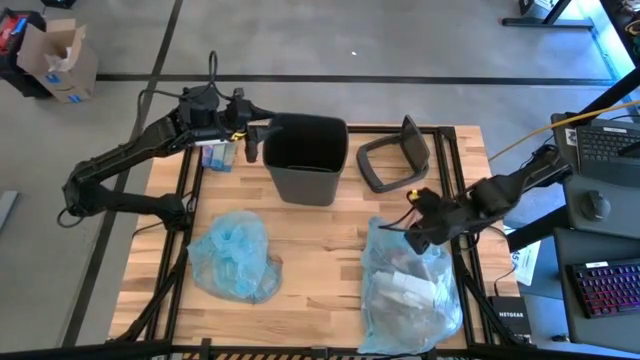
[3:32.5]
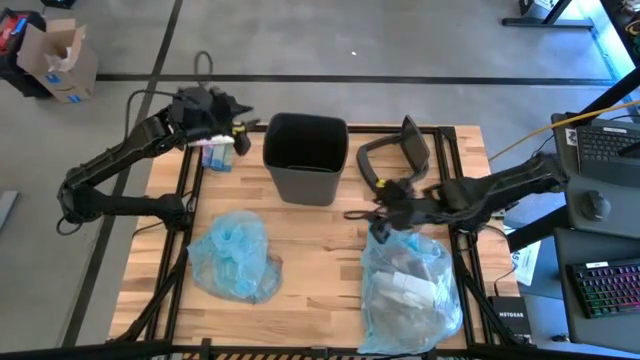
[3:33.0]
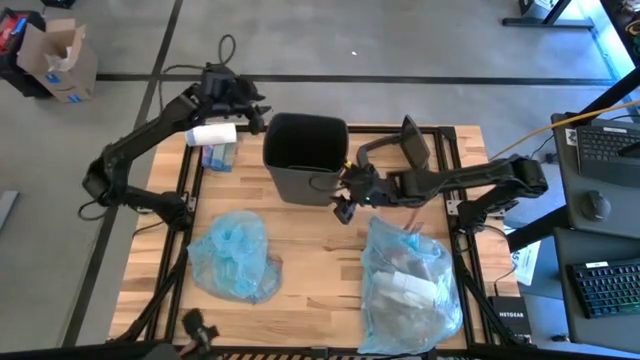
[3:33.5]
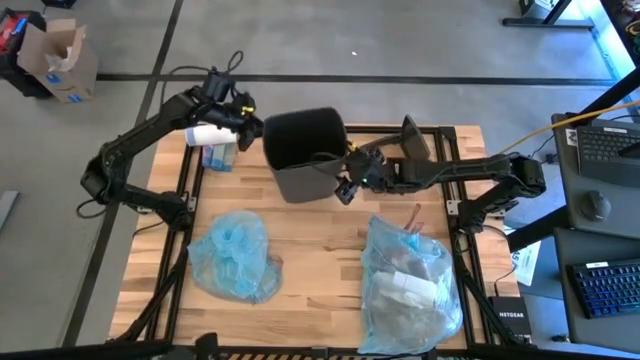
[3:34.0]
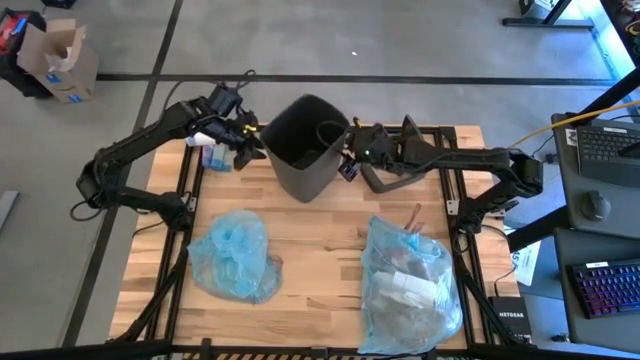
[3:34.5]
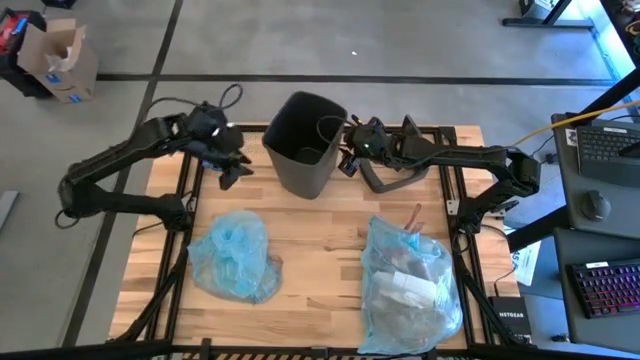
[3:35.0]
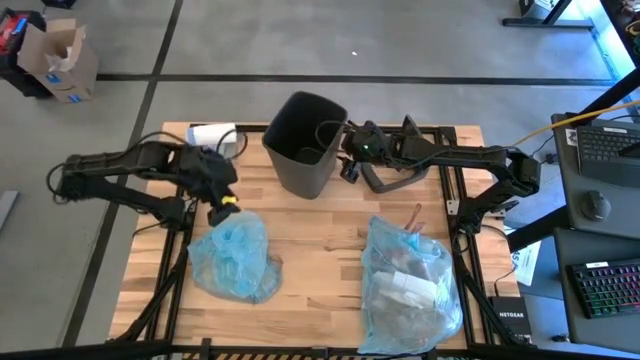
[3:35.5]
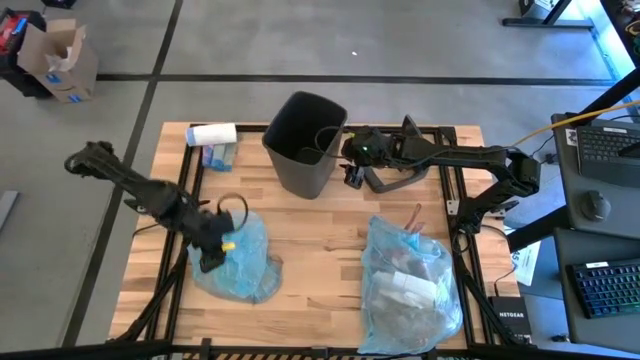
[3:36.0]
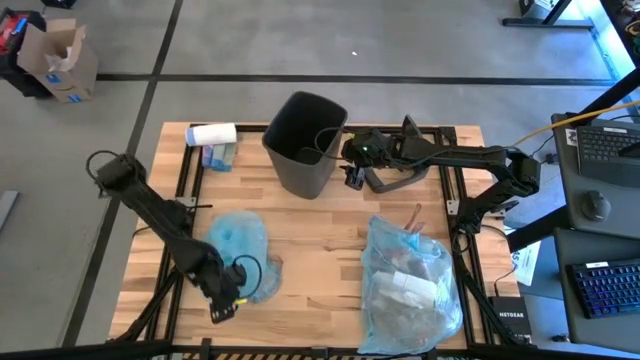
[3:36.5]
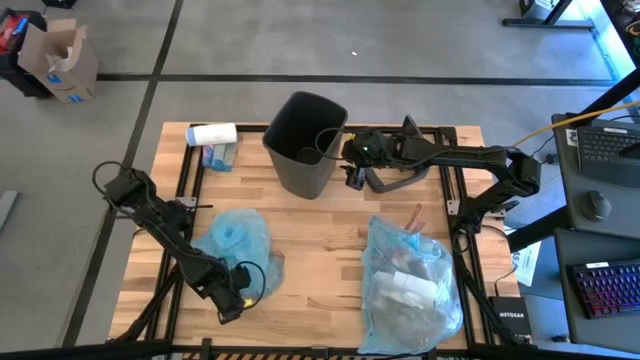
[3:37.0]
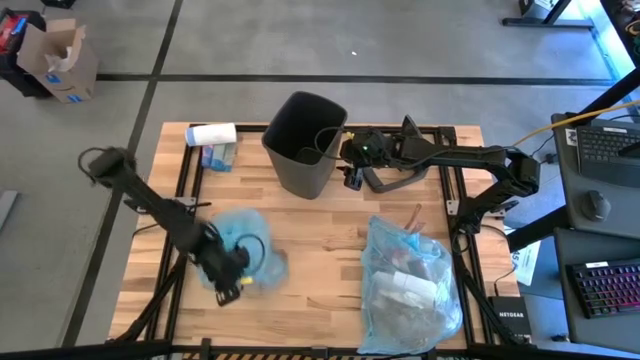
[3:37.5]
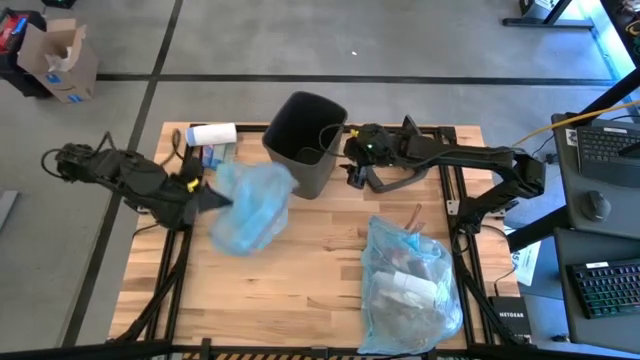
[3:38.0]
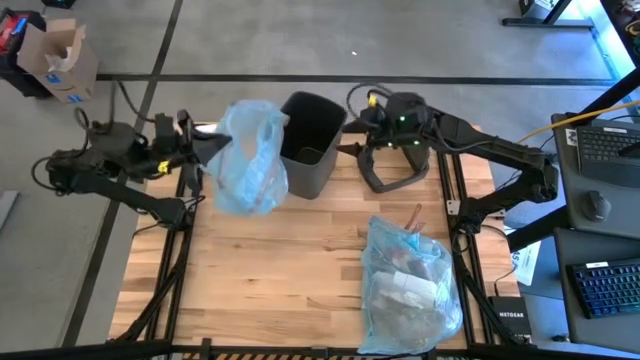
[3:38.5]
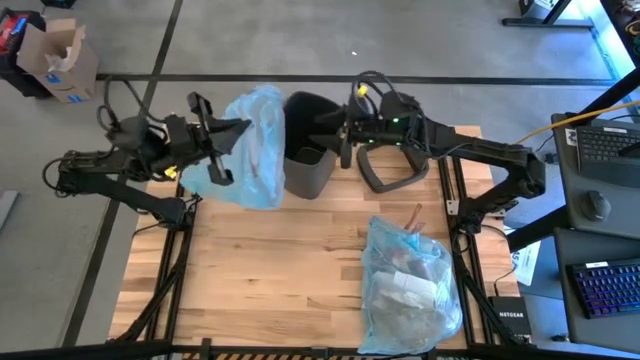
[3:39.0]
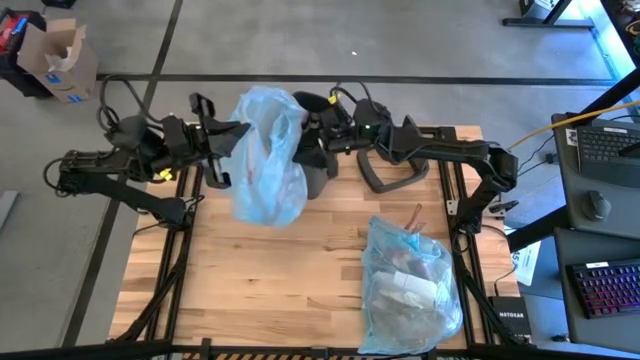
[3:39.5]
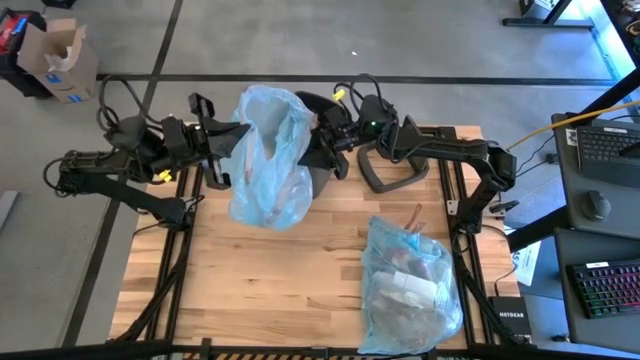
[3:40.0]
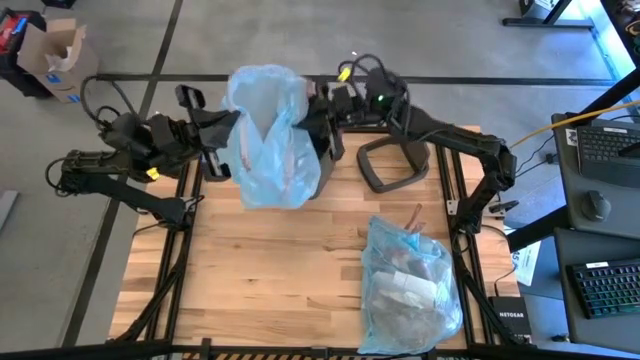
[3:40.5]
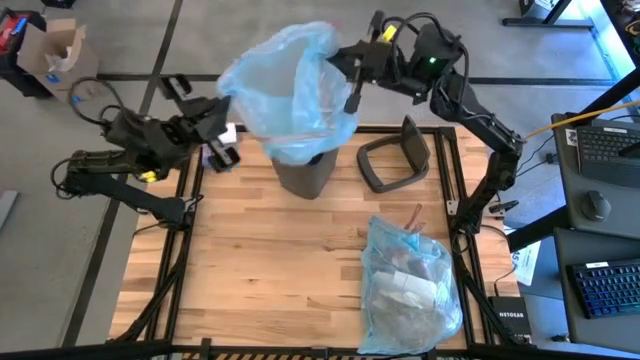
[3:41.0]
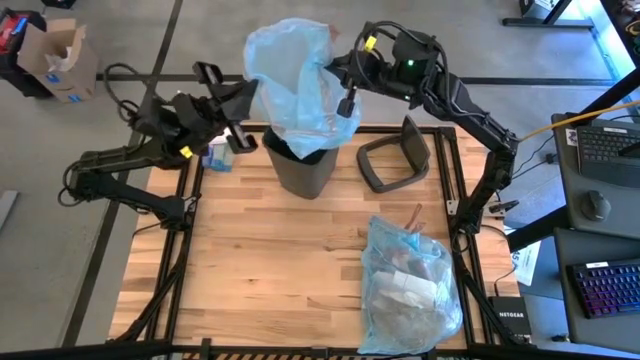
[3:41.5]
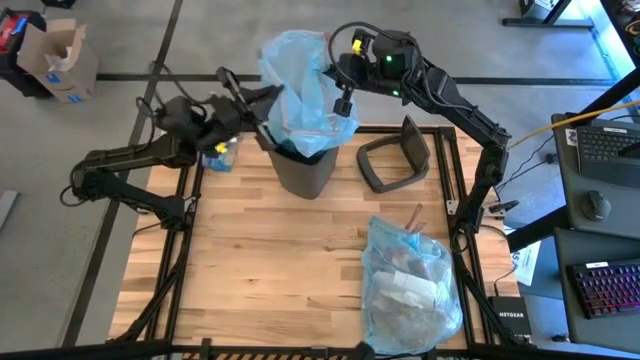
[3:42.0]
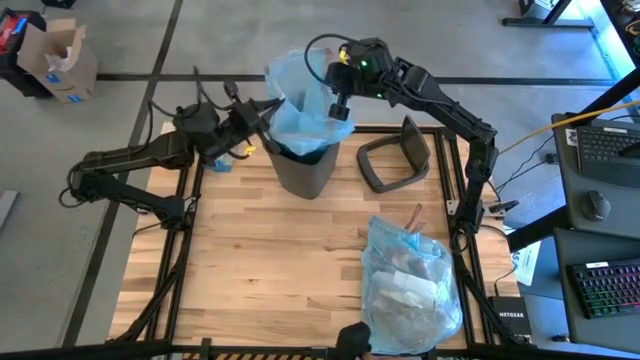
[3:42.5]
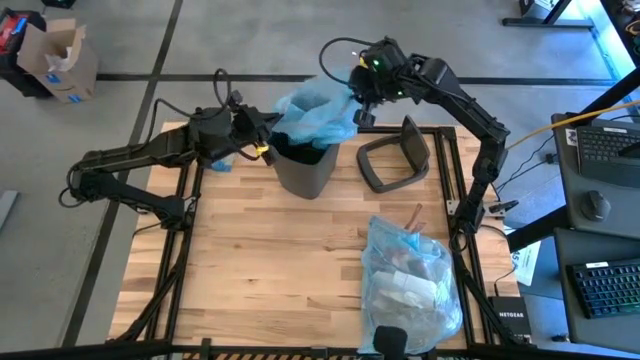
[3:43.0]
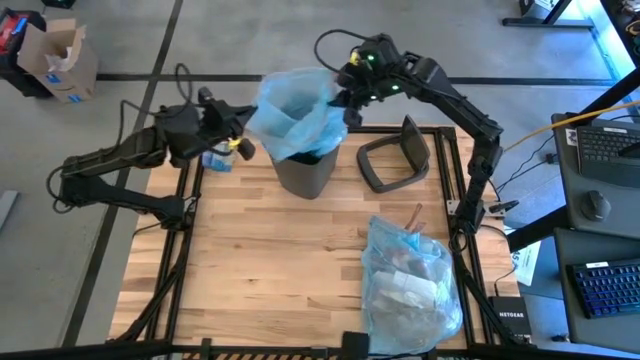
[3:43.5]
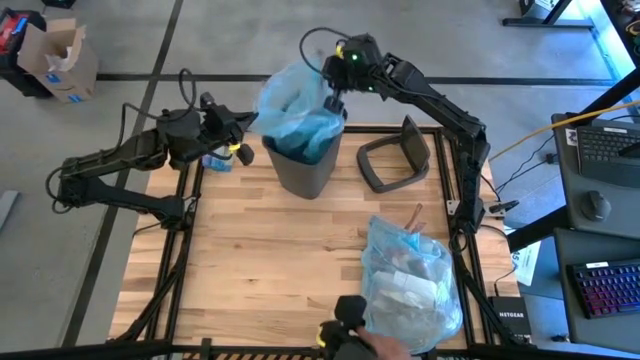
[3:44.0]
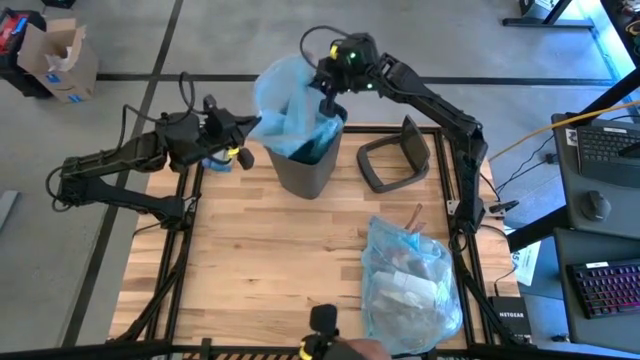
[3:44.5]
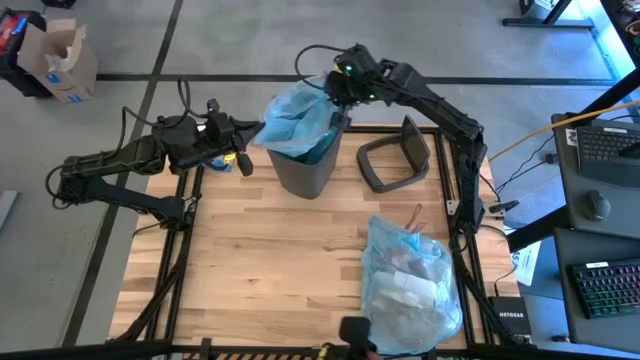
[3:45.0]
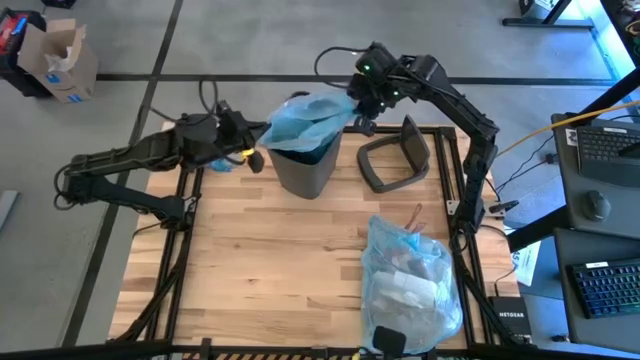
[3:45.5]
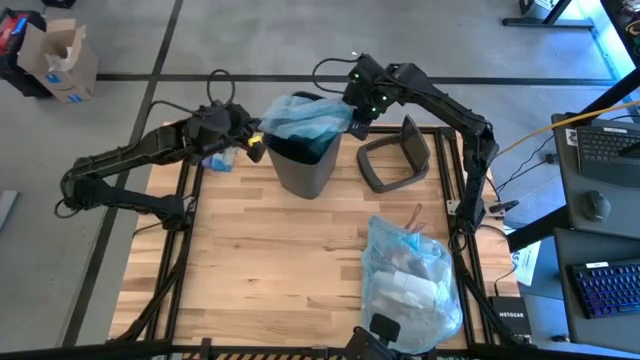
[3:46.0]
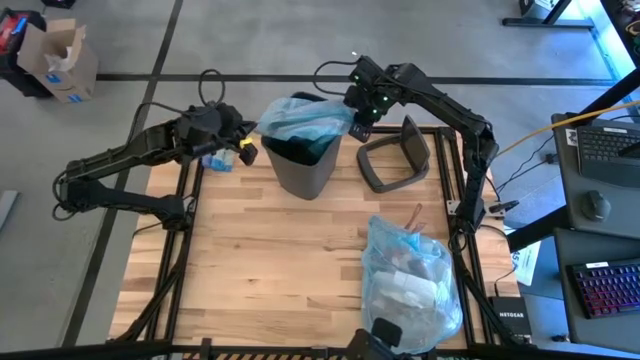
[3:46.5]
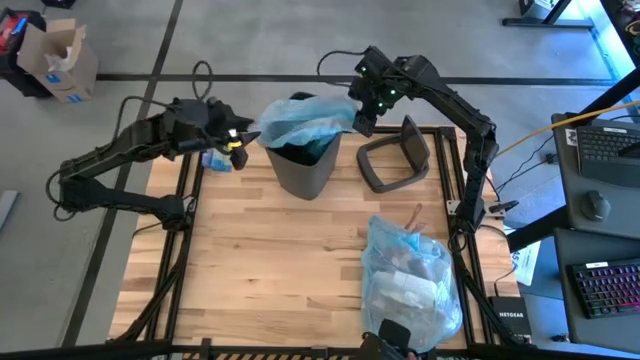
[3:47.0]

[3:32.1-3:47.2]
Task: Pick and place trash into bin
Insert the new empty trash bag into the trash bin

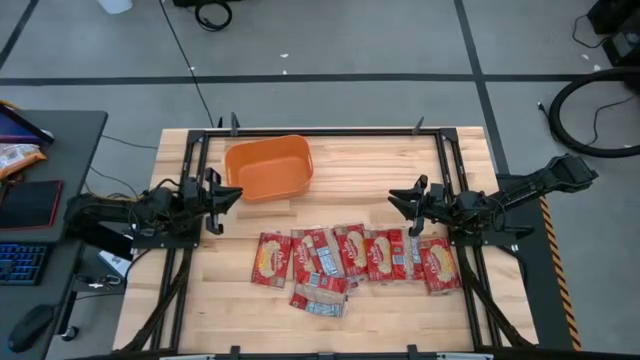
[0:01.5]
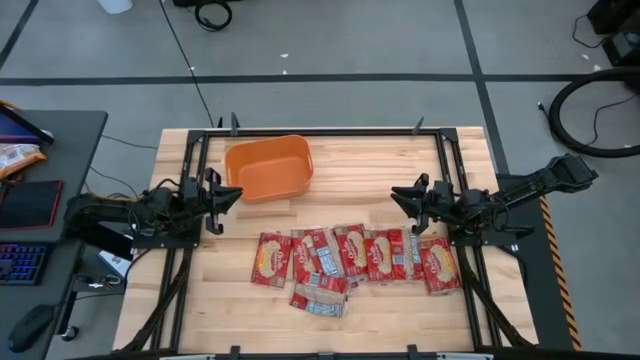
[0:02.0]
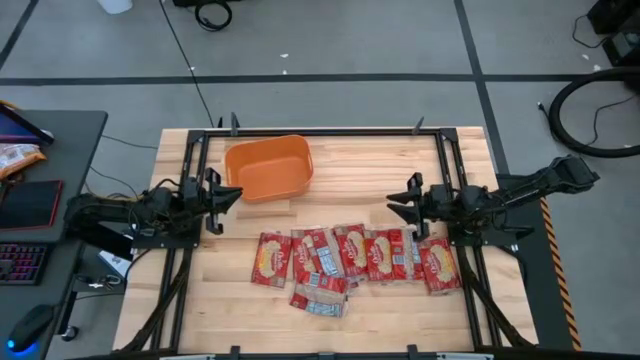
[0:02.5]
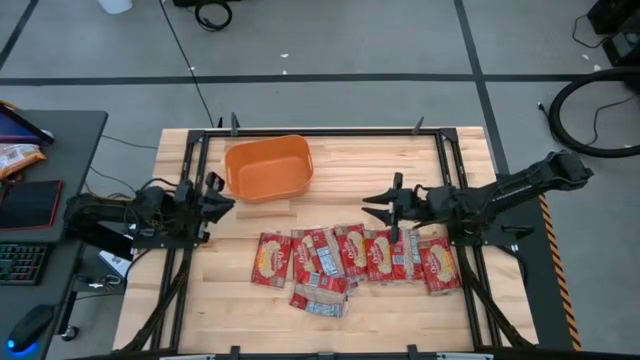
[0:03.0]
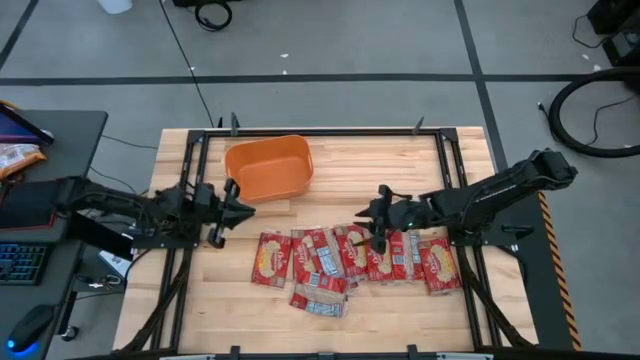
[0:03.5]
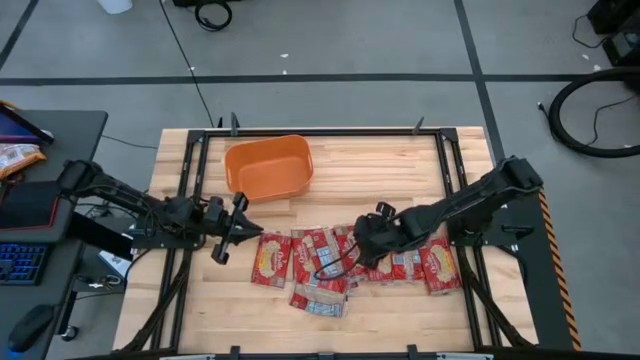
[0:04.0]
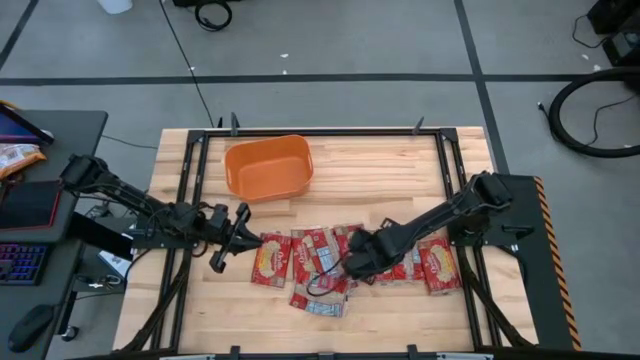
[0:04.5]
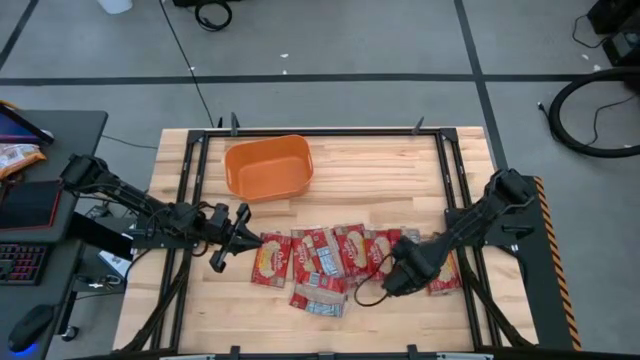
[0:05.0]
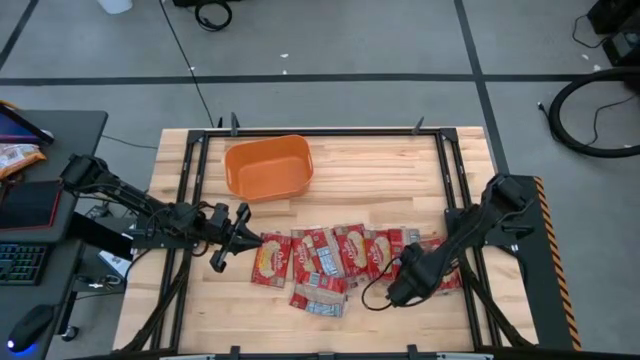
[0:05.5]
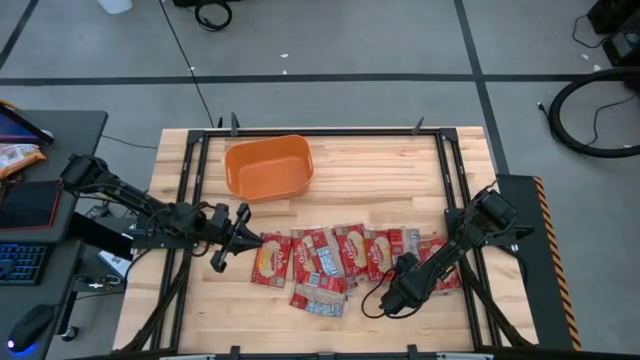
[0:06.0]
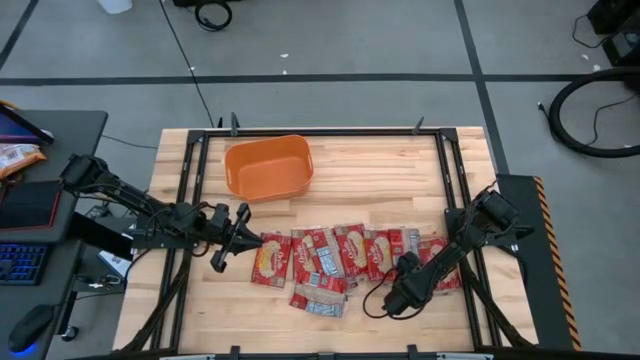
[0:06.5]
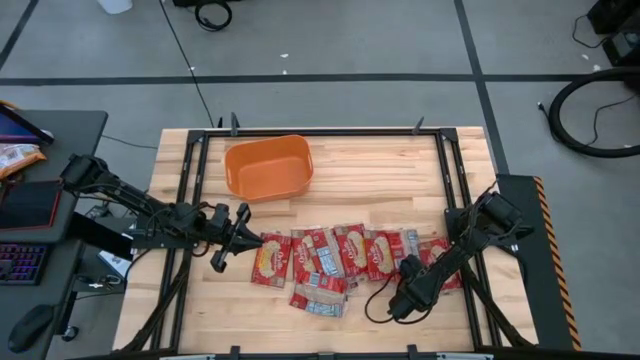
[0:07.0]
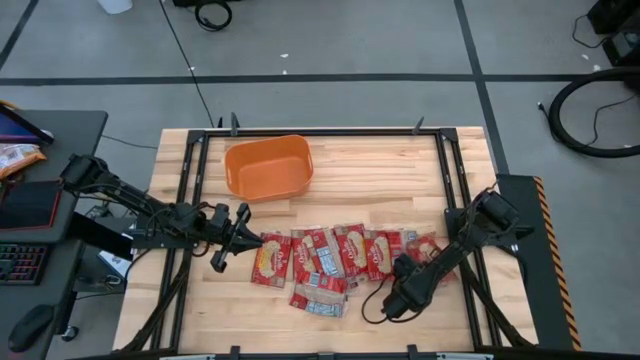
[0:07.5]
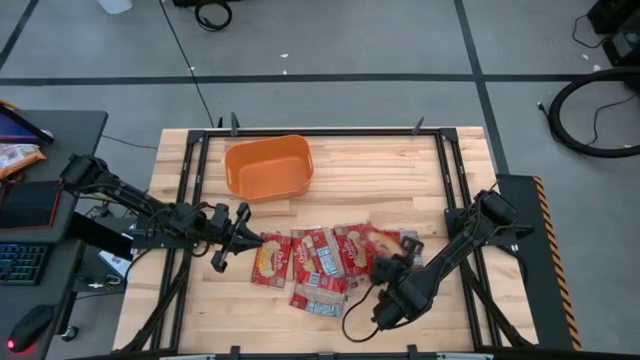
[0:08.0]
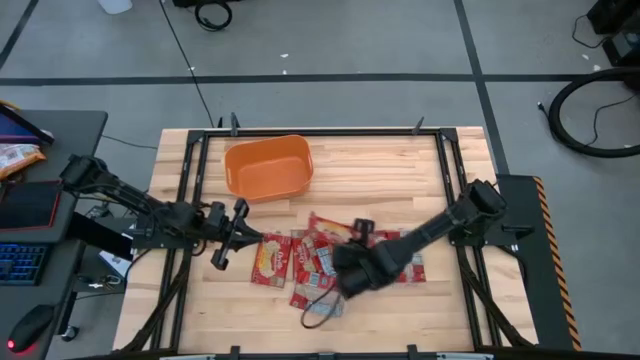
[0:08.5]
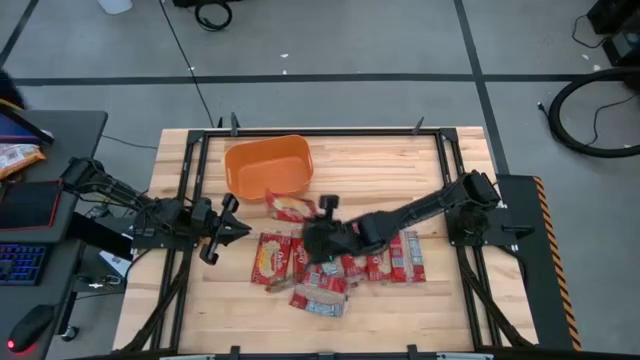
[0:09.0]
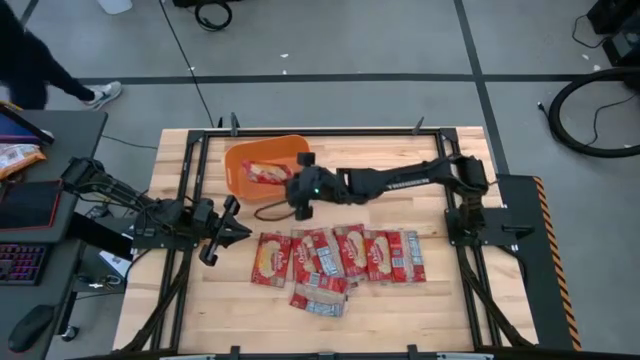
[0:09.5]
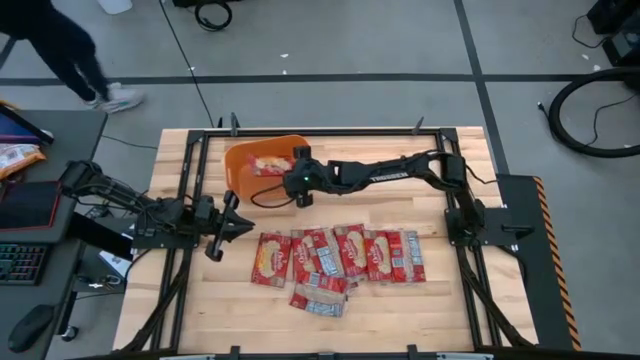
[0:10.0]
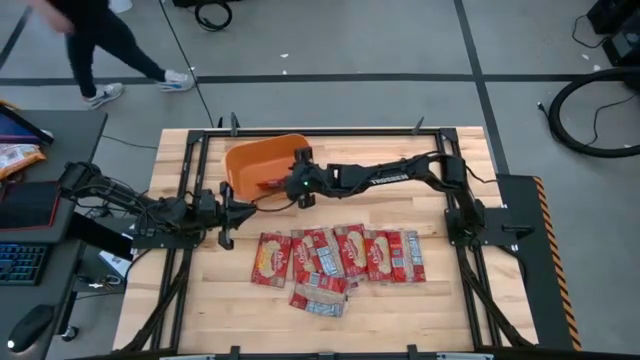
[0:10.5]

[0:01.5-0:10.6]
Task: Sort popcorn bags into baskets
Put the red popcorn bag into the orange bin
